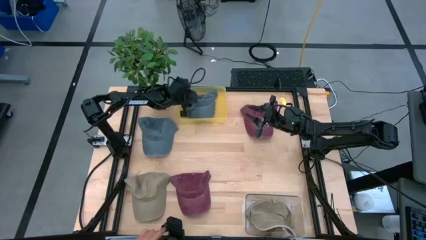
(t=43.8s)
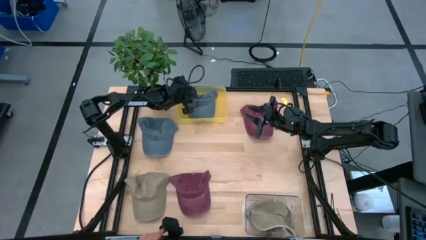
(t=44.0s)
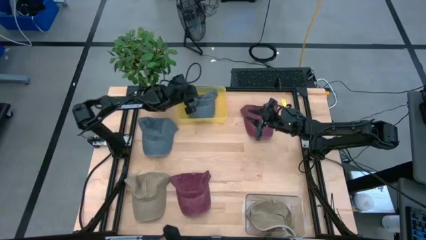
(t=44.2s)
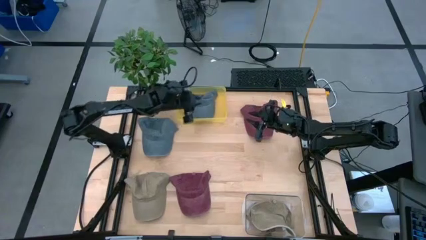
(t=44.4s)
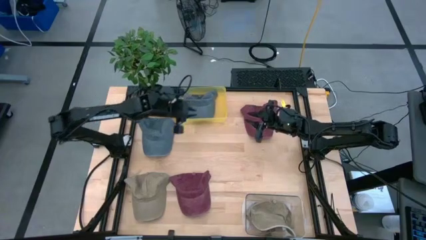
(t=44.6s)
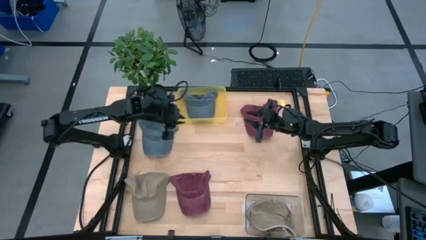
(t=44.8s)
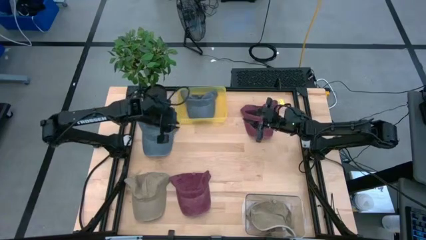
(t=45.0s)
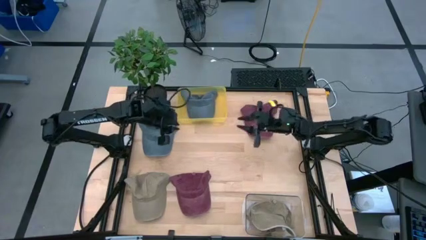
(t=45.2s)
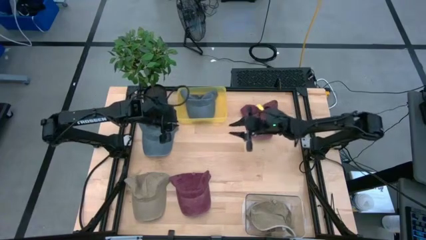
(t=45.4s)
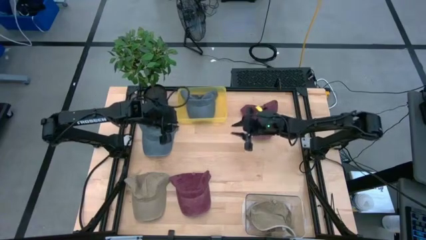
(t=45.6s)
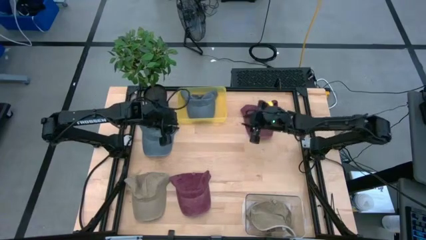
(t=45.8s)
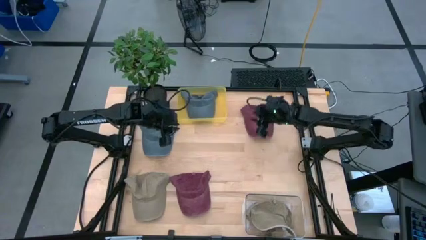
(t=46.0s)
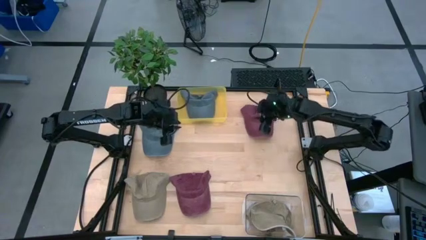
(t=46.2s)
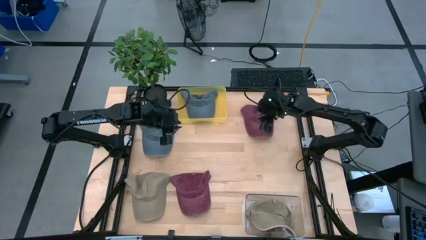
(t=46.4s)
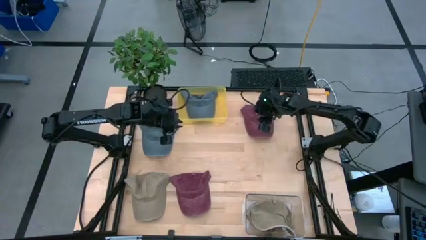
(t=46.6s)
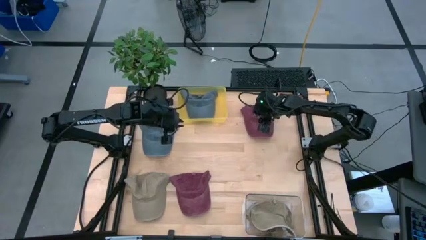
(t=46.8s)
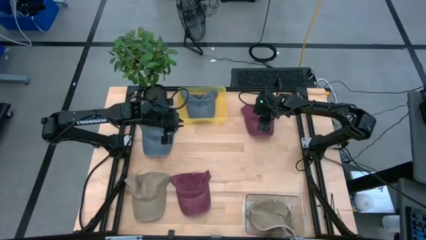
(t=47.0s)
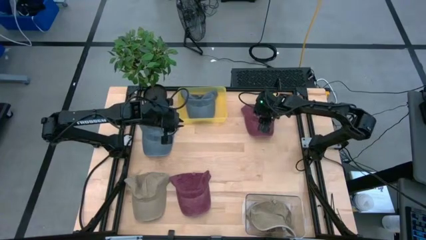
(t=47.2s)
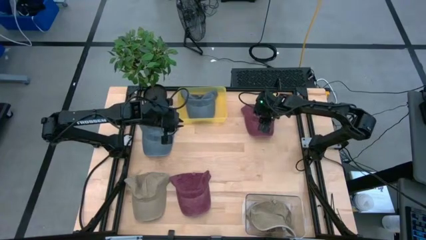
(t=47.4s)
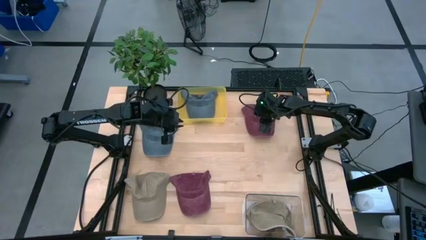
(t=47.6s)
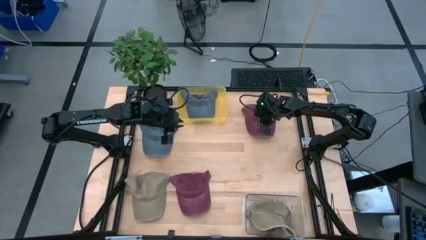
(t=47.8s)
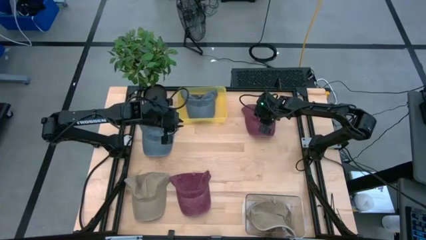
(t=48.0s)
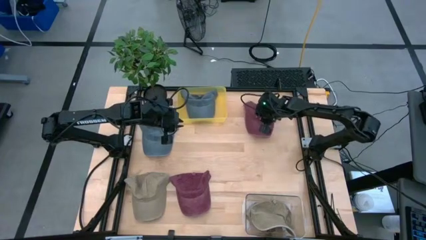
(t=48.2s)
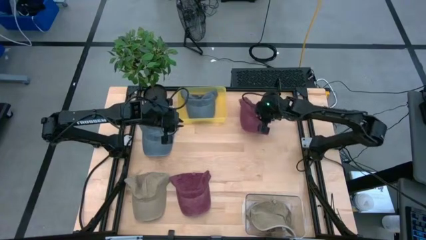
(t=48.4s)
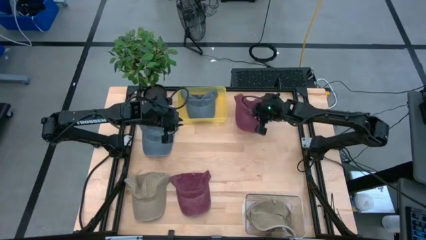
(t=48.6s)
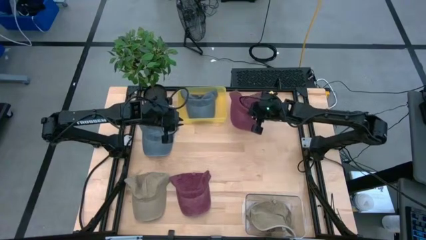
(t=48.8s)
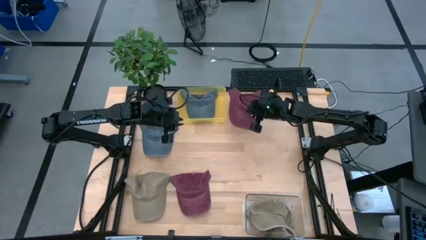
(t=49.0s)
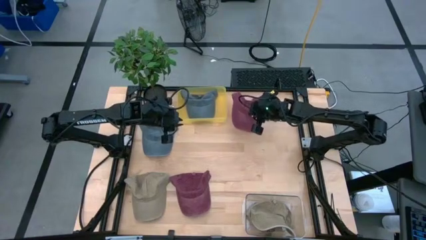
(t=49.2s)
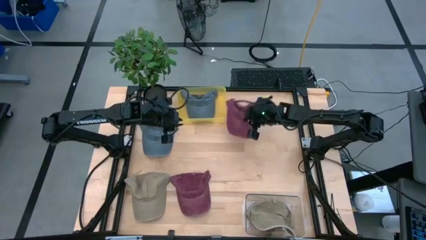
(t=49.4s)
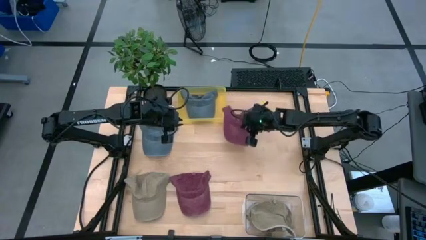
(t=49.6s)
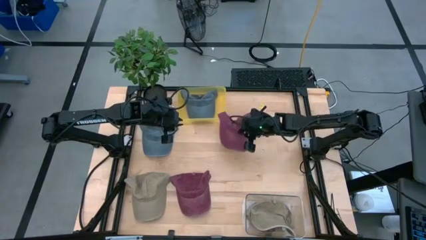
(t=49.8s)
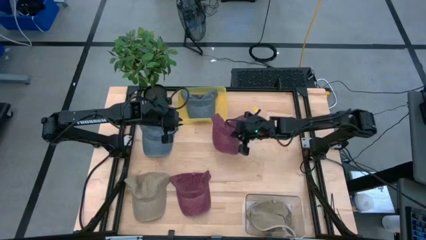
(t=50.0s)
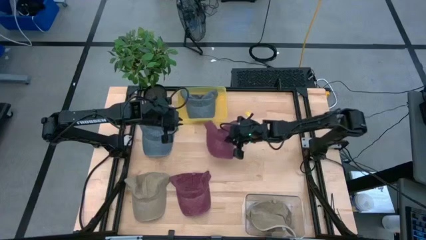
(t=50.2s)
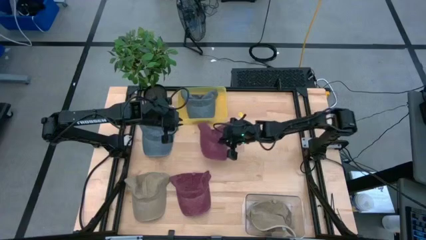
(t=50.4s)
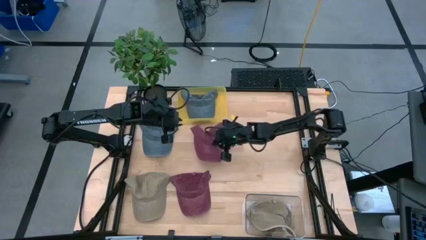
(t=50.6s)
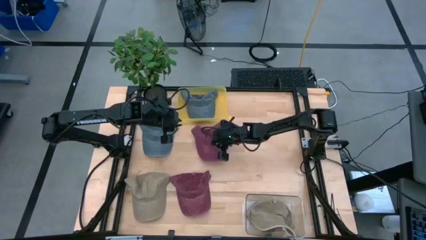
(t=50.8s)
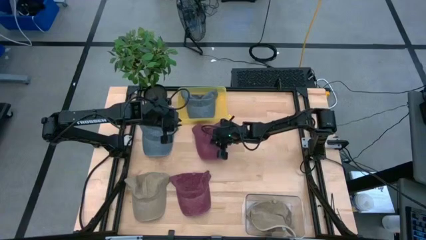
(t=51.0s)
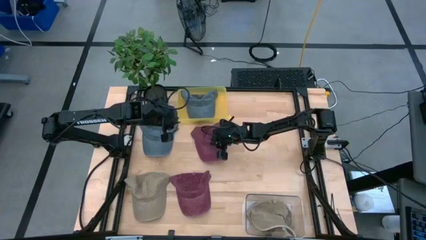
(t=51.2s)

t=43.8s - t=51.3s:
Task: Pick & Place hat
Move the top red cap to the center of the table

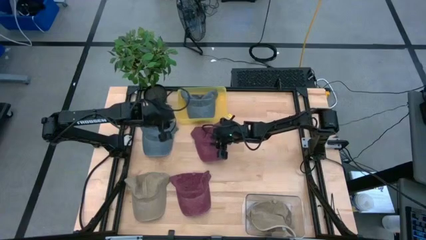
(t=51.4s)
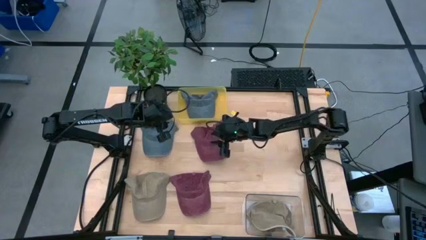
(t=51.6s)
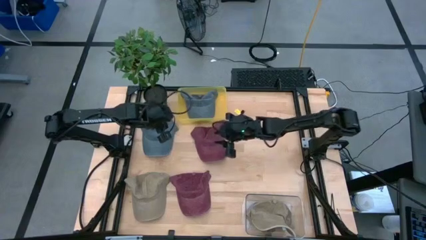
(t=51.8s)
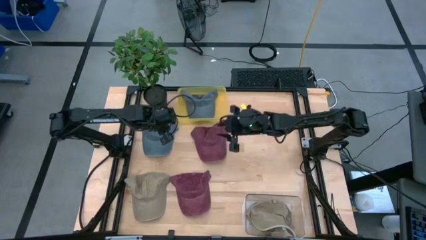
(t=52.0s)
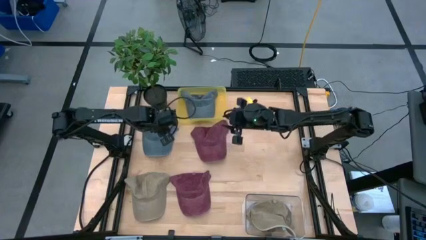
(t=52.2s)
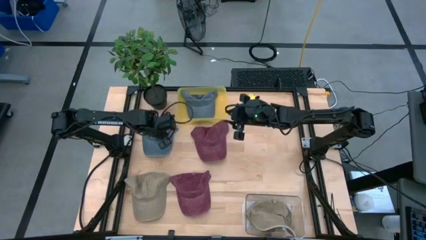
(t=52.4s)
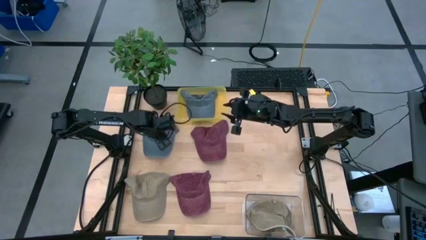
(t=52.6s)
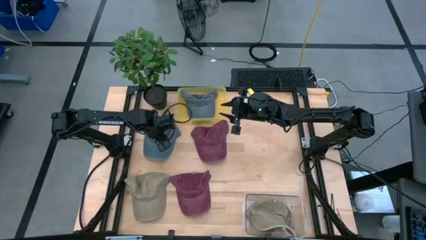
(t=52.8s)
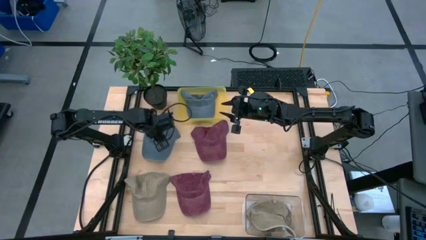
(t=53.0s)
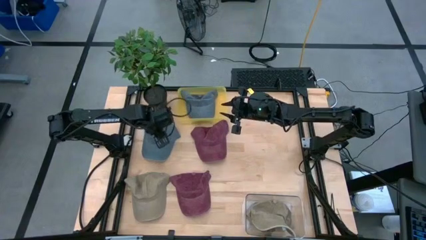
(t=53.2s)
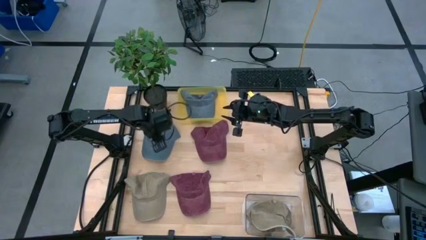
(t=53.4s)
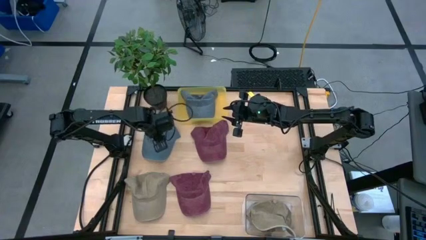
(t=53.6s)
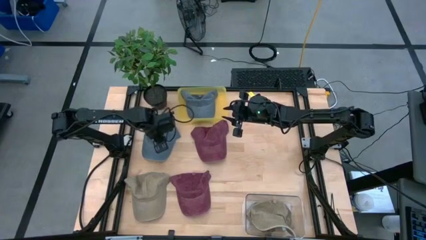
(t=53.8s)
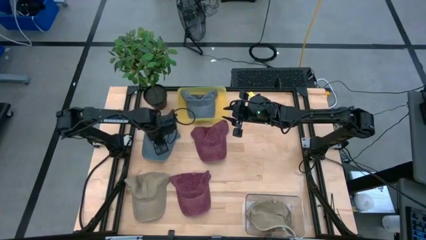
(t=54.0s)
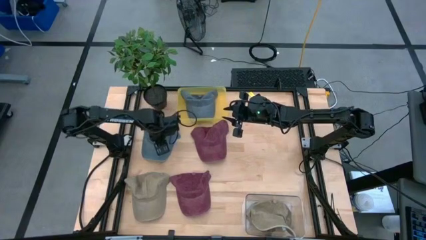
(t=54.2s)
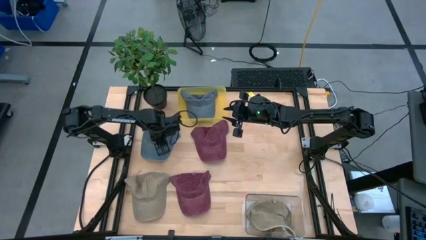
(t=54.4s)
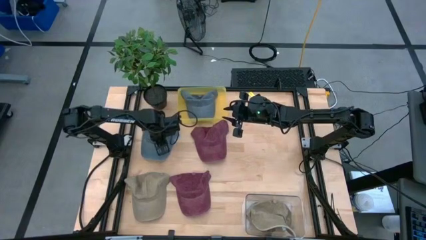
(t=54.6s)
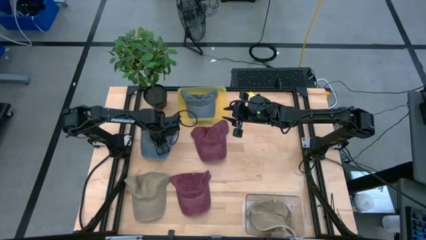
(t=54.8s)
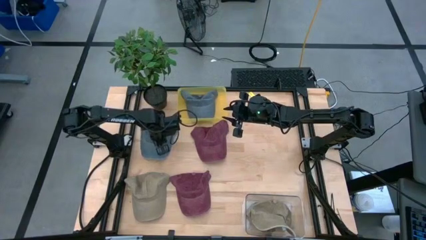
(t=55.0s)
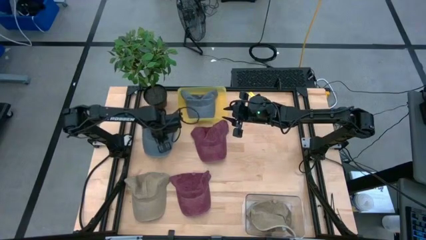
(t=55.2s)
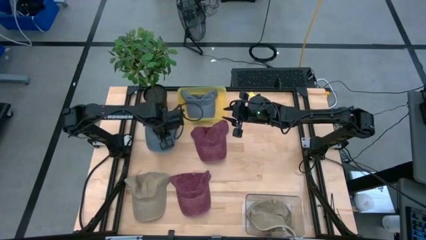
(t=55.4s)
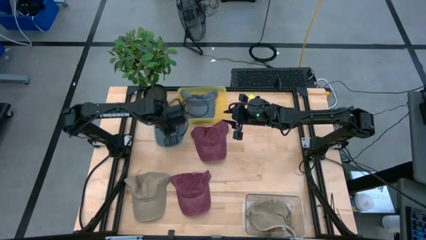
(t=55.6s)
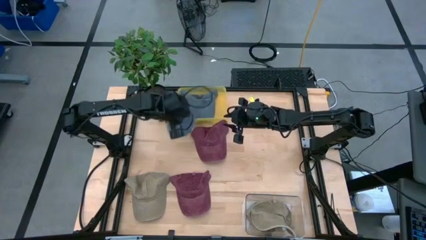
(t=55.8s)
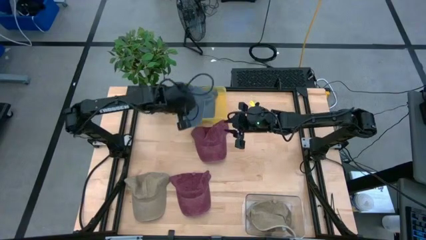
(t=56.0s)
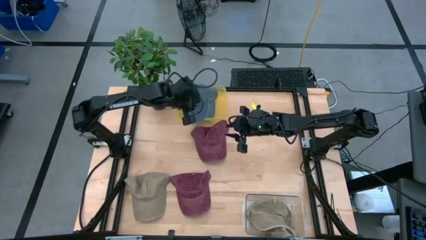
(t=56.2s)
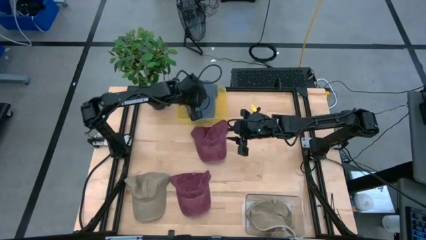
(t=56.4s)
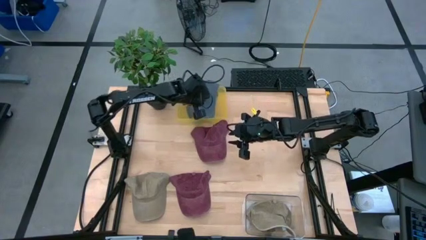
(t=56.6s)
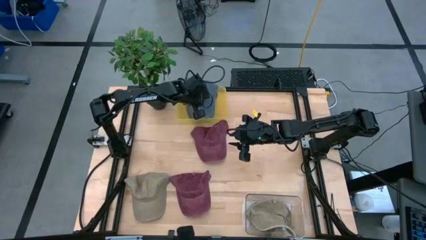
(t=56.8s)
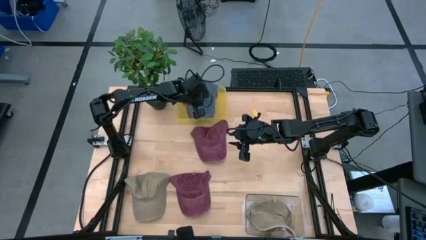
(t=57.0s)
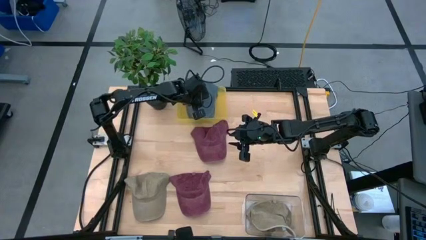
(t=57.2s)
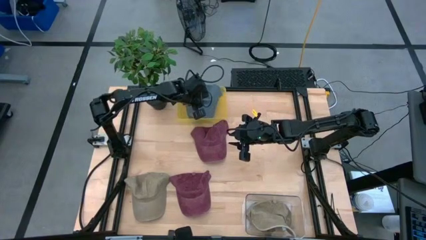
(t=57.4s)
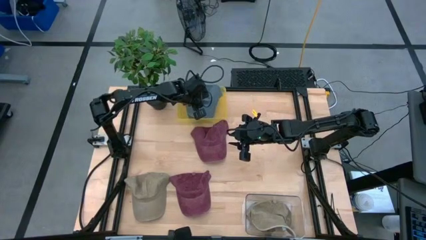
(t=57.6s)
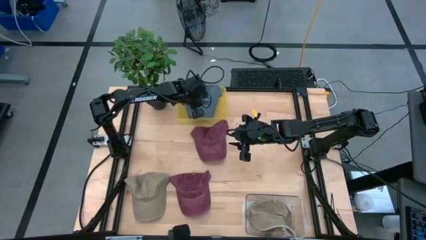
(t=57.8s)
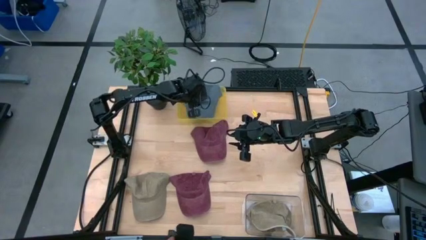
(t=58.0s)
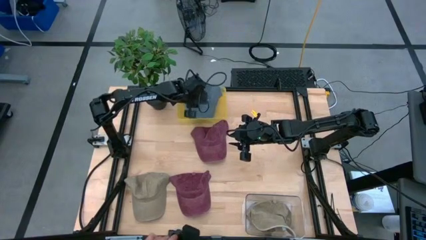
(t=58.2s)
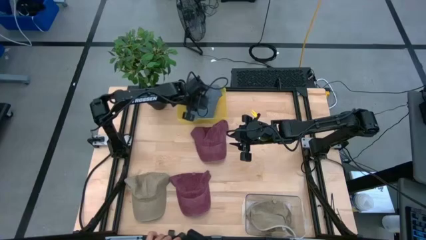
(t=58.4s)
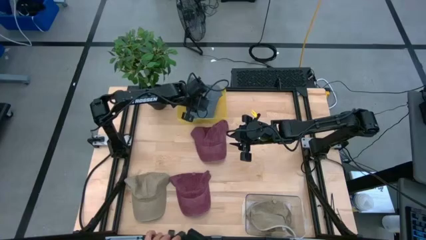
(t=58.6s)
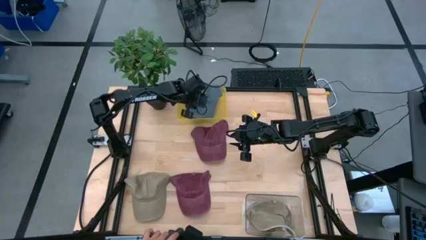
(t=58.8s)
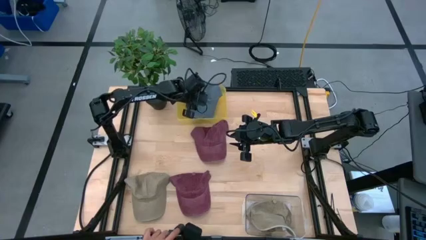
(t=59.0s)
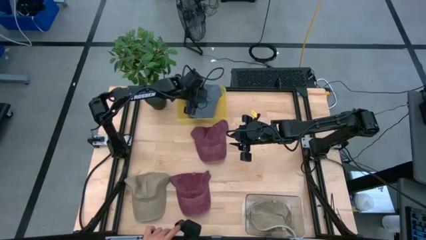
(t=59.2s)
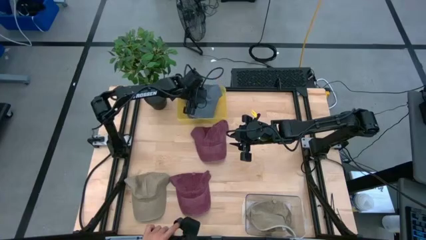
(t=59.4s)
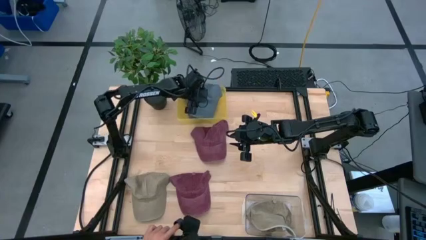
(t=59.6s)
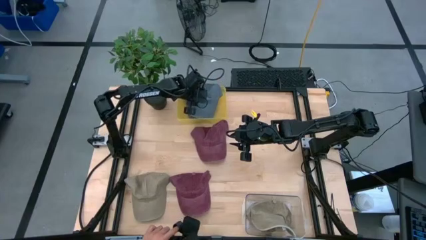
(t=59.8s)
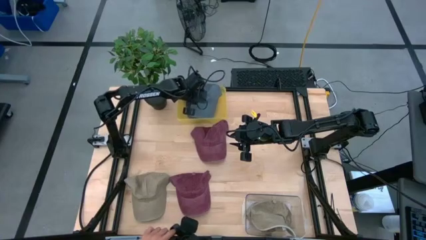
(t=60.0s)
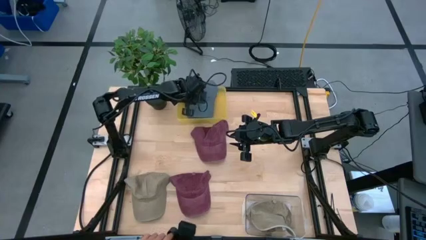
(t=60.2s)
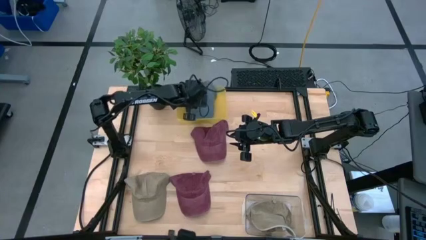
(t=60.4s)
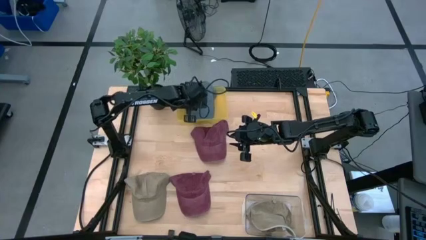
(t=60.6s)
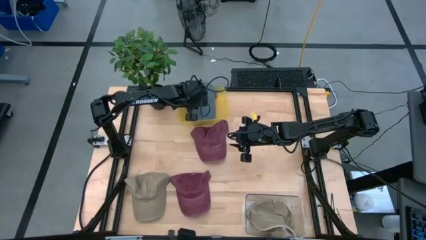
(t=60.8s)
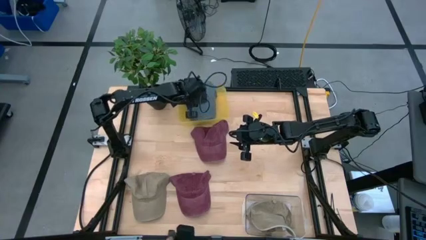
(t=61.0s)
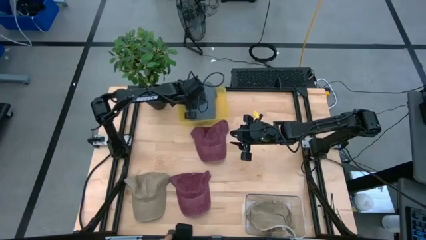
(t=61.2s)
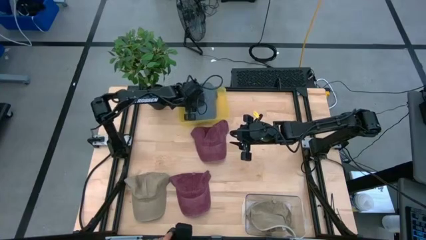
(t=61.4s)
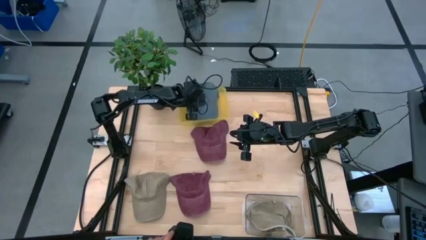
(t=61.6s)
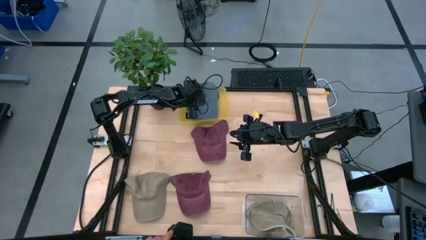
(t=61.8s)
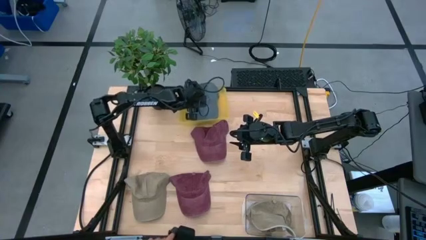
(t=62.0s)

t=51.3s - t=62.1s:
Put the blue cap into the yellow bin
